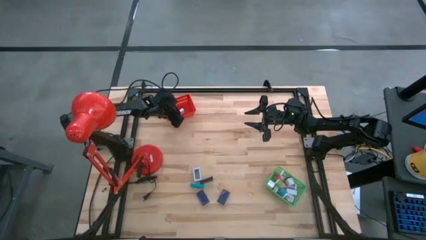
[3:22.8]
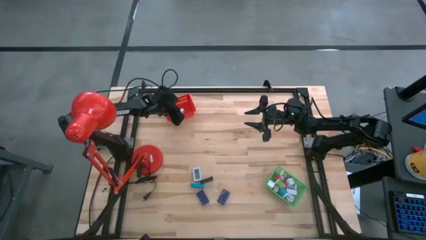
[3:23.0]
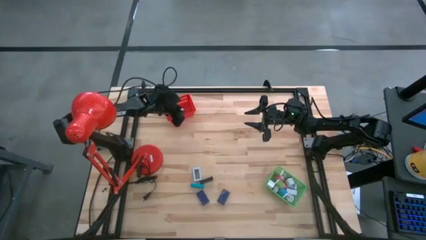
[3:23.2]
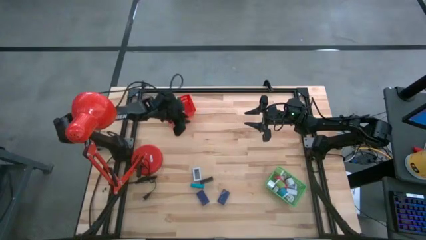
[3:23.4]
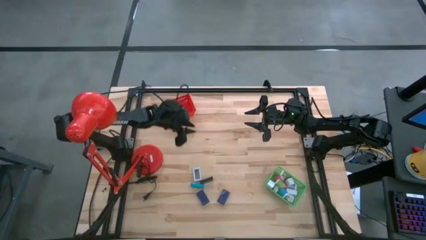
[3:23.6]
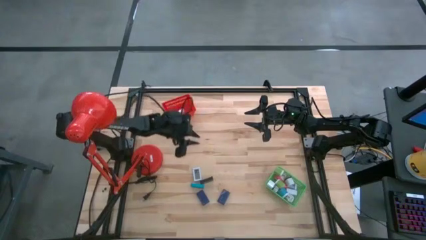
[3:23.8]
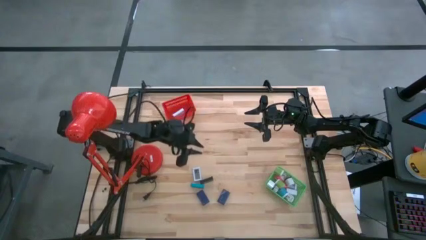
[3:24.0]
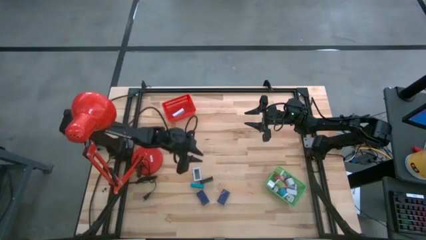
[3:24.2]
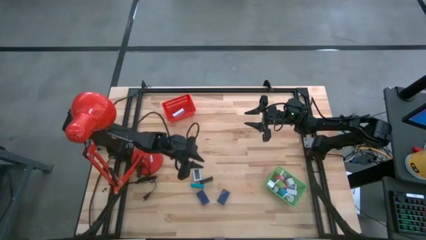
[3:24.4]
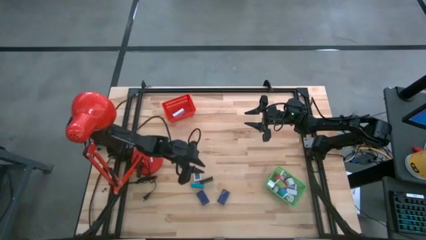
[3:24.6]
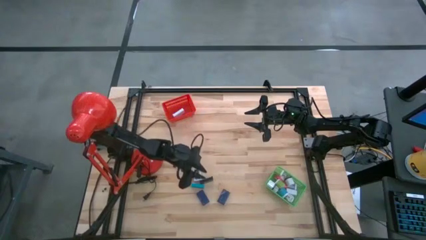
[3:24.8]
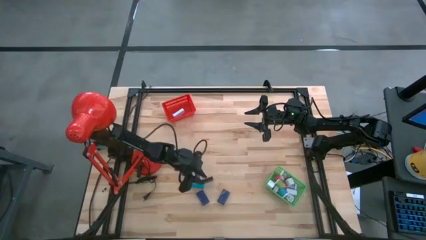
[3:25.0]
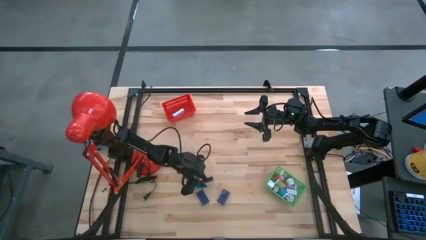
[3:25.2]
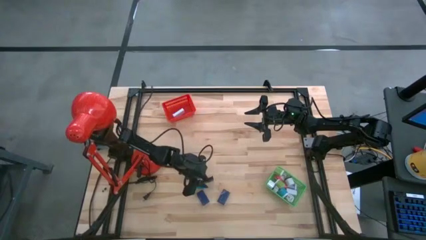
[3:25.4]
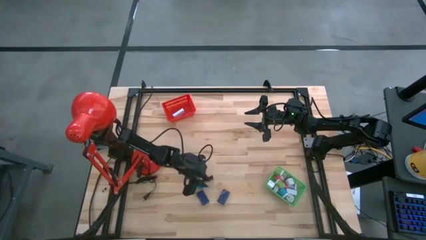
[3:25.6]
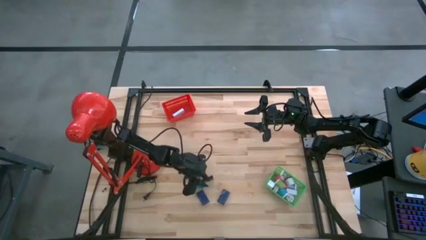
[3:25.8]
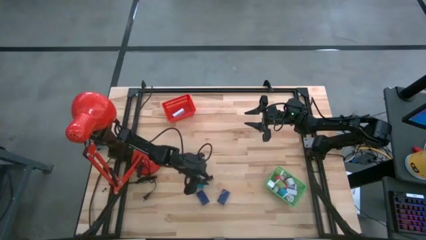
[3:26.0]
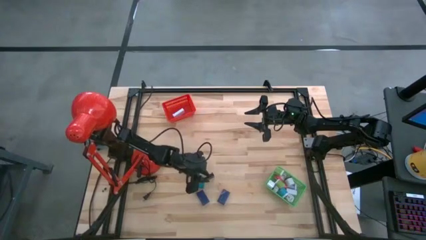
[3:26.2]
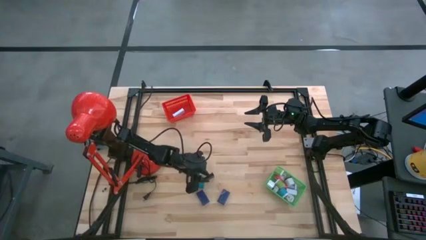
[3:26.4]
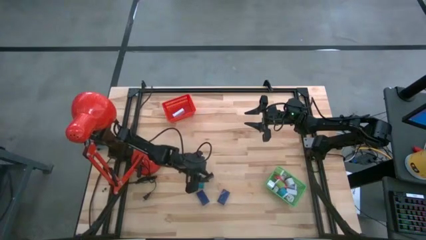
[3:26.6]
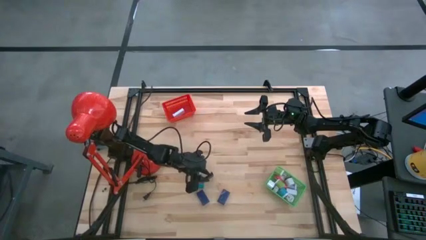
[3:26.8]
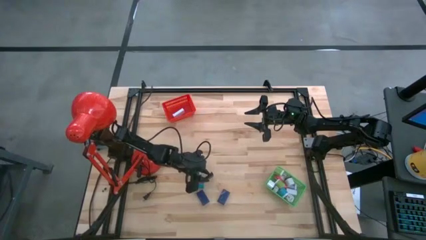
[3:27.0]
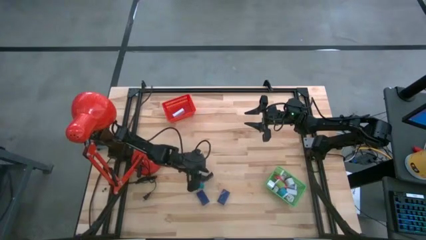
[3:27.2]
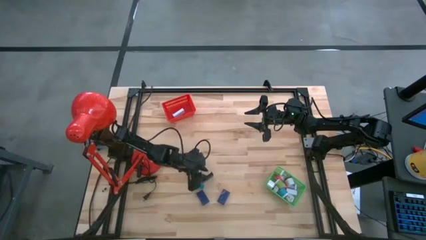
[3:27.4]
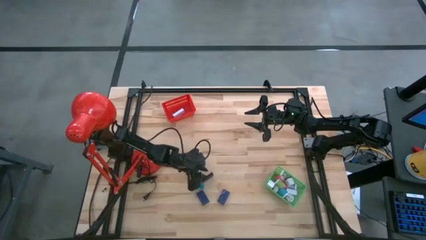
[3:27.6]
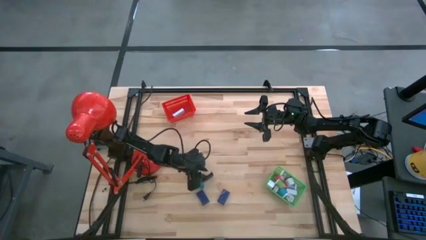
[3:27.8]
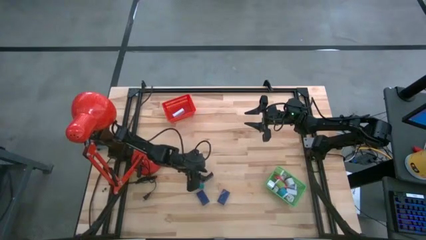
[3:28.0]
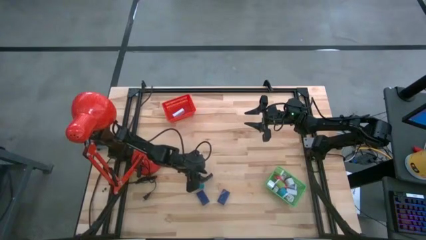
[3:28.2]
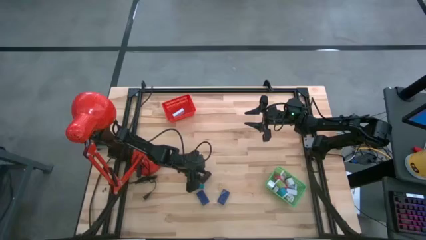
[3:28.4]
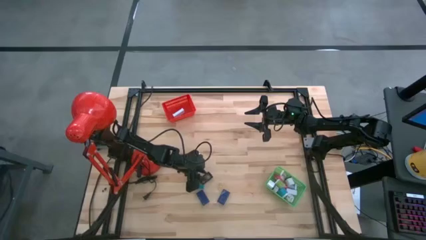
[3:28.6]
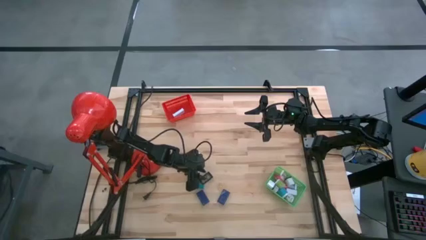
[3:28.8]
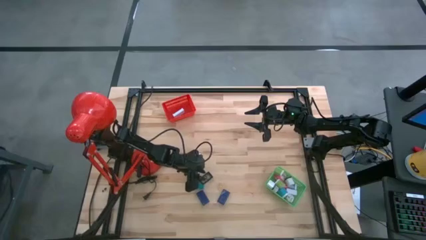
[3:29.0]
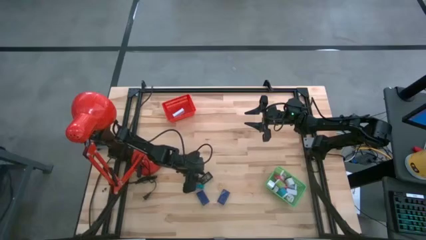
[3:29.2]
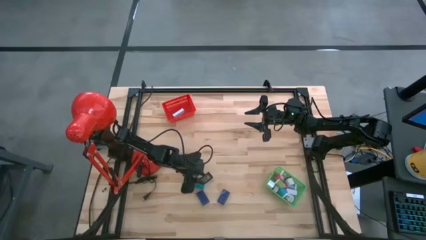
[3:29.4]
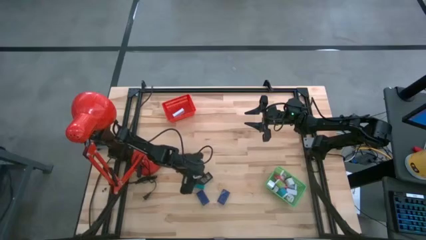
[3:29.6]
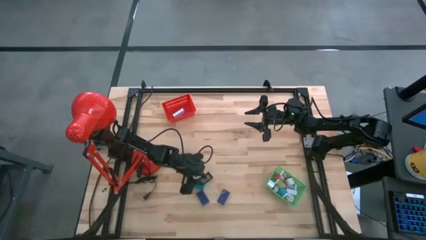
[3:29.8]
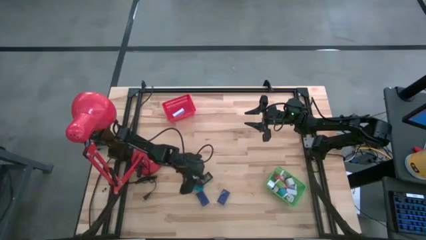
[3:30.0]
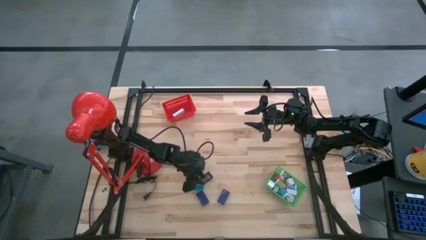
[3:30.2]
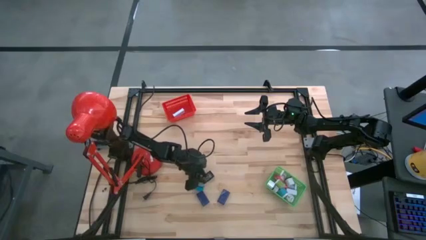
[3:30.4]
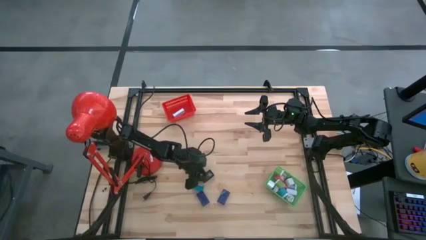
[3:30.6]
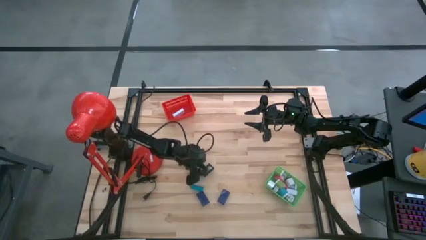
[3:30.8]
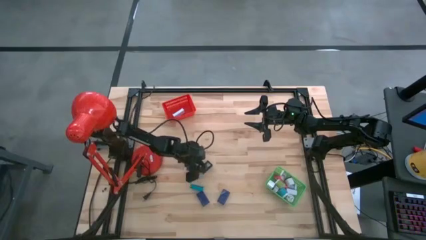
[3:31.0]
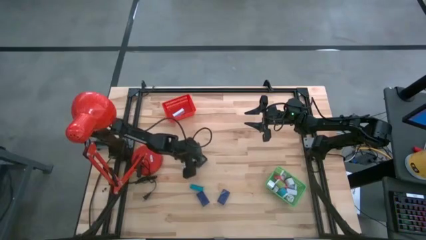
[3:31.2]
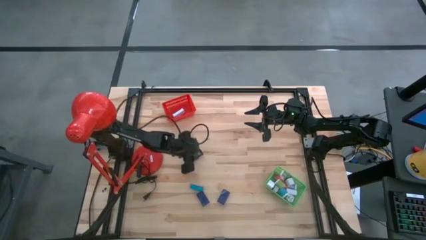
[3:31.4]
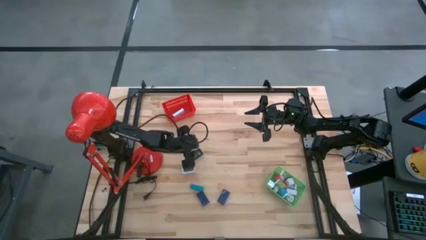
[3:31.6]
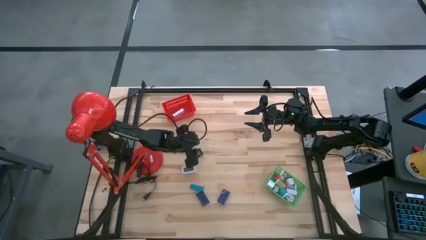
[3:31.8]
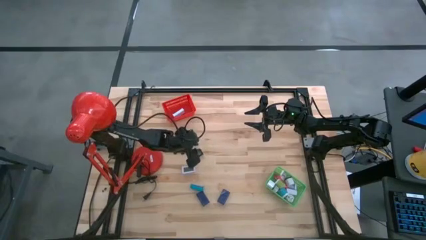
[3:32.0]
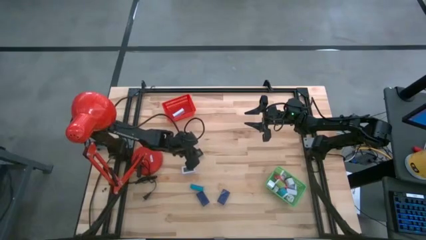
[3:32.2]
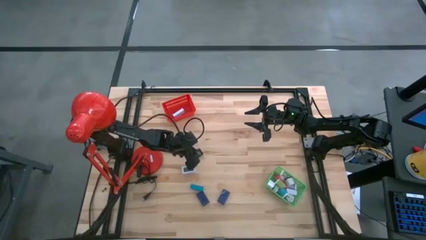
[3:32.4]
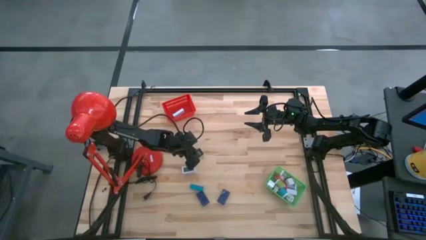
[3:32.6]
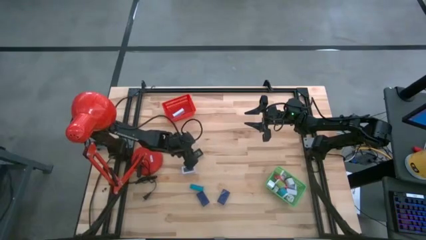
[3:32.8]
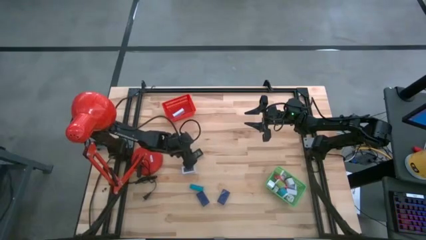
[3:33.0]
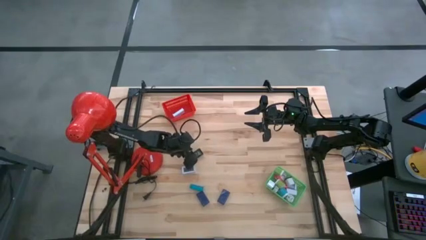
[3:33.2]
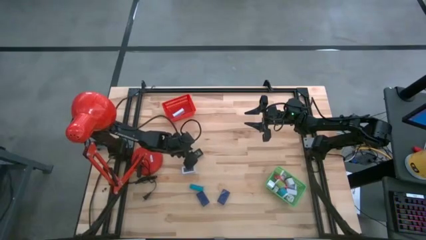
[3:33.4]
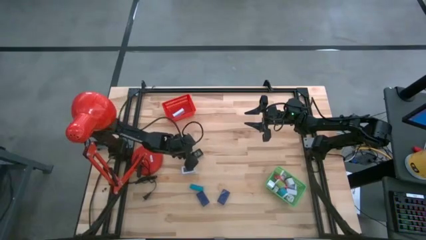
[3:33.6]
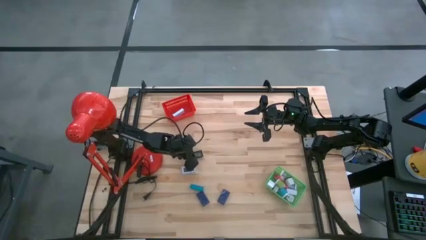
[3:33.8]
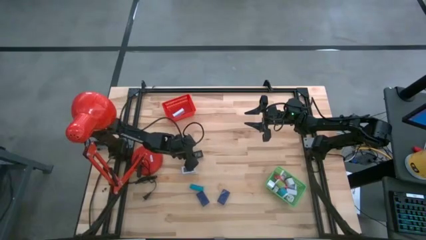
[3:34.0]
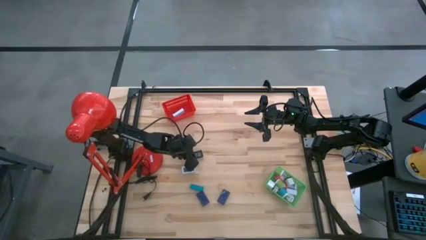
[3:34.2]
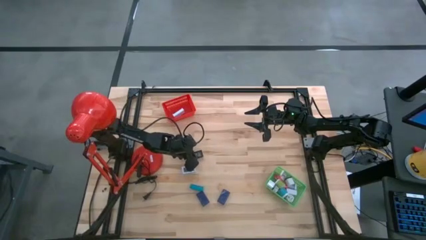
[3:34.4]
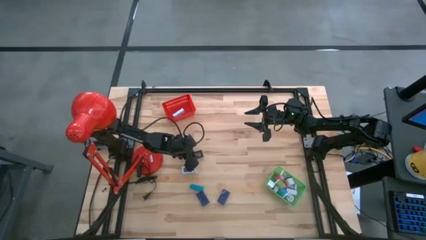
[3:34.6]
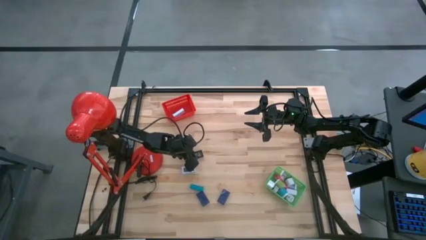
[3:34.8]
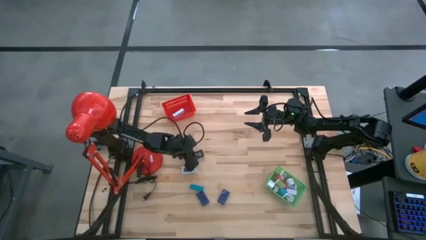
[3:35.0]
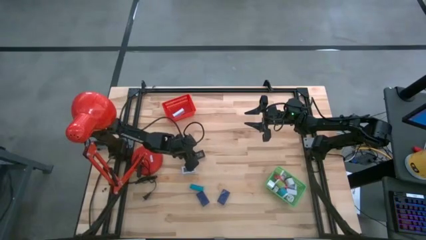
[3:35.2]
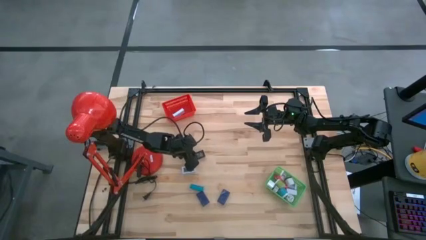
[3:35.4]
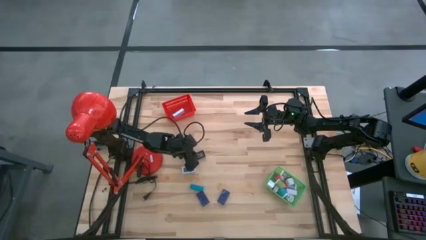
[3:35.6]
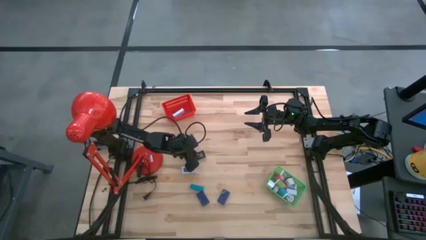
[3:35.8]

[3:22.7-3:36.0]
Task: Pick & Place Office items
Put the black digital clock into the red bin

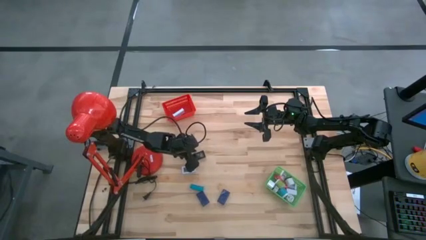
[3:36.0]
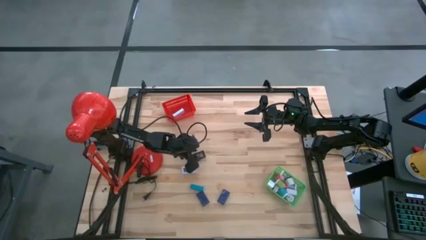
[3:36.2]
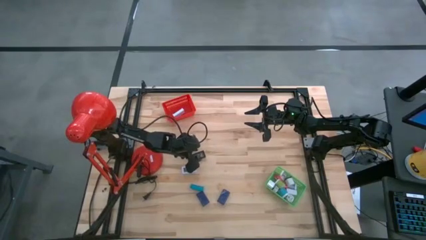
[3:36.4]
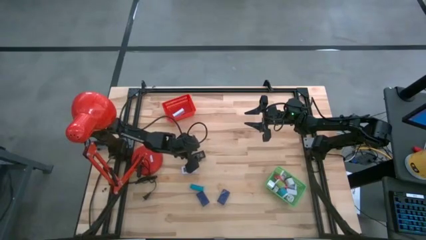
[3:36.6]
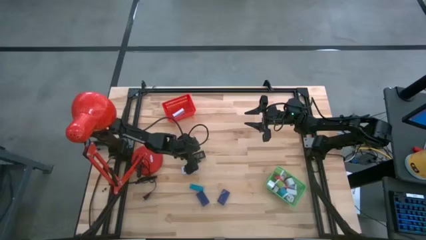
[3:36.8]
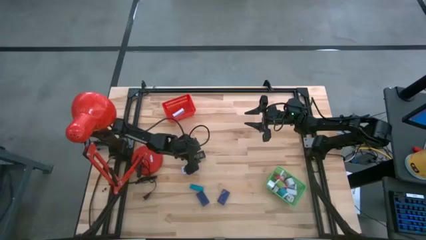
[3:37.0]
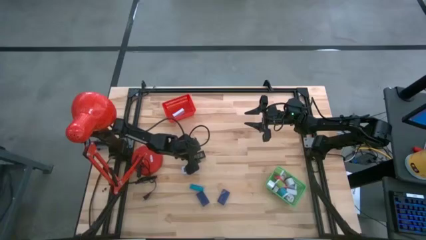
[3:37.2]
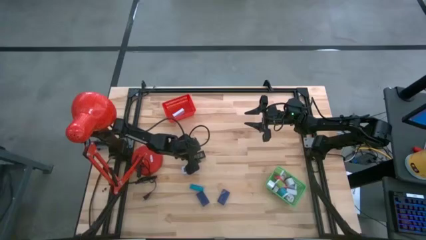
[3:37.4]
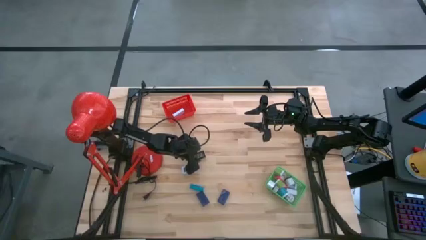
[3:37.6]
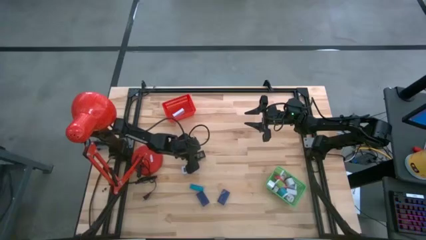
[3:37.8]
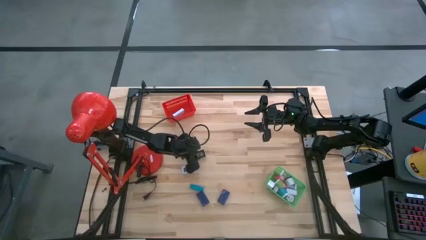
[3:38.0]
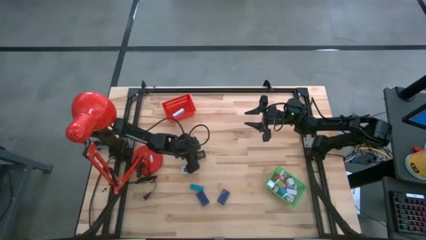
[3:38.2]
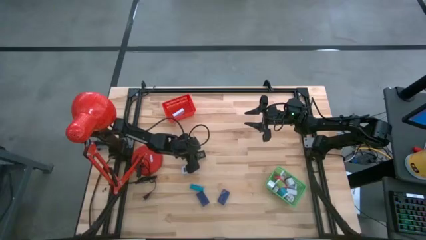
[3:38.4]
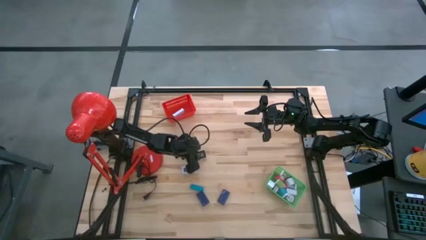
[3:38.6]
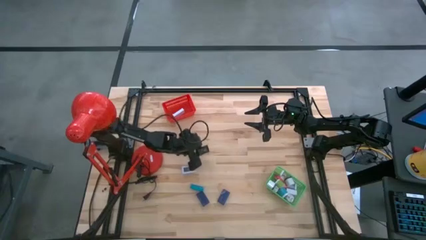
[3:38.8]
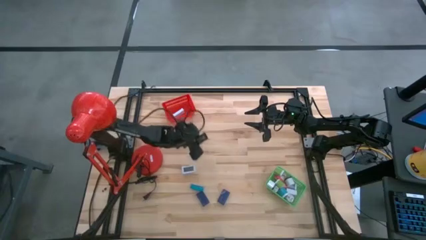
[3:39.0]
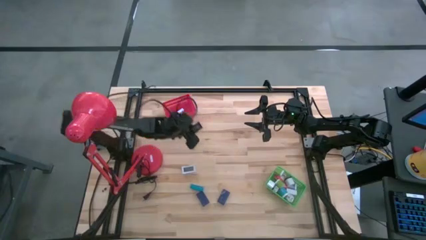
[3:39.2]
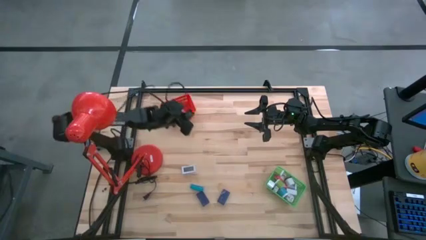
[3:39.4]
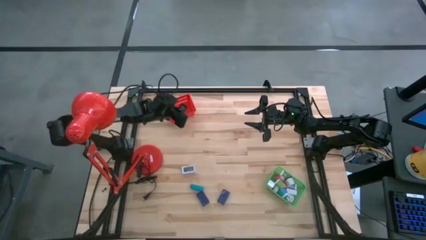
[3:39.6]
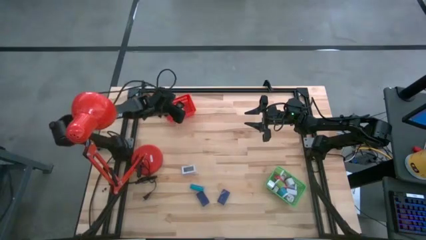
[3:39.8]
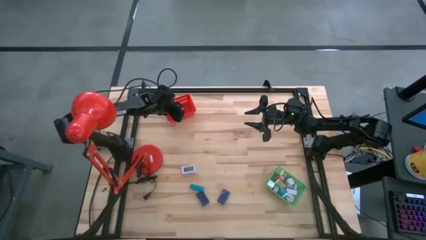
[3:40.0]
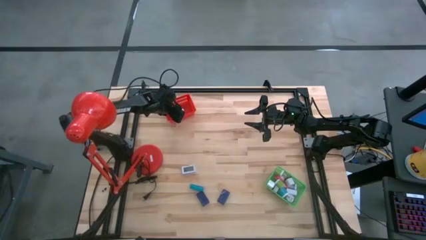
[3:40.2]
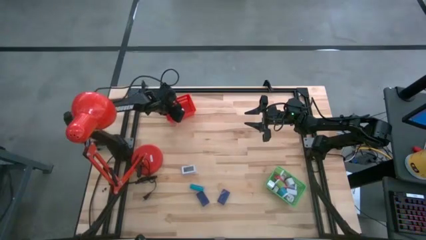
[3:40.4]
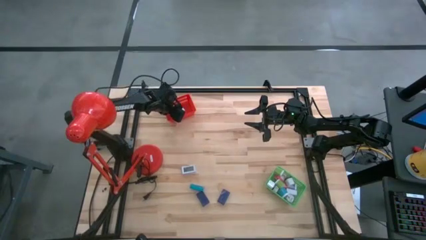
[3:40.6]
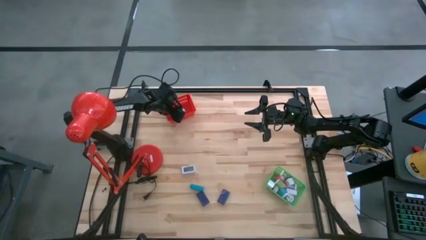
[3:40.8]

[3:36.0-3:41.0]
Put the black digital clock into the red bin
